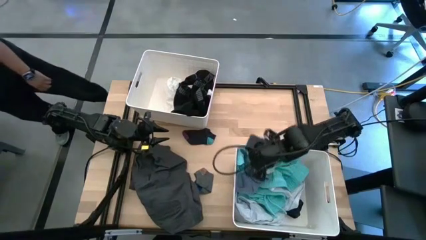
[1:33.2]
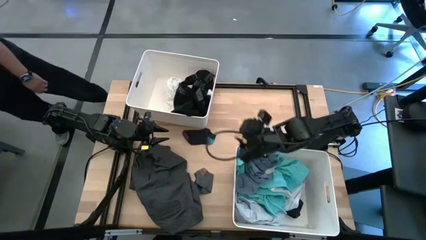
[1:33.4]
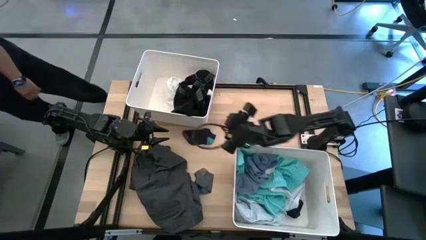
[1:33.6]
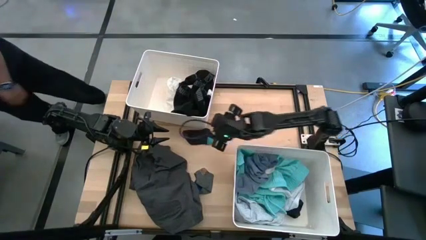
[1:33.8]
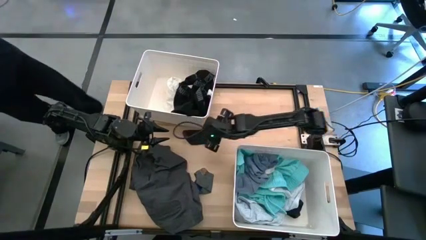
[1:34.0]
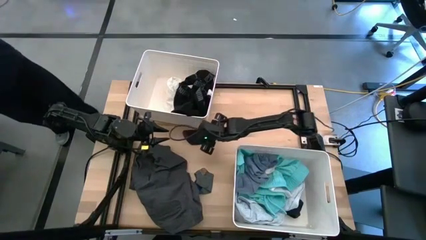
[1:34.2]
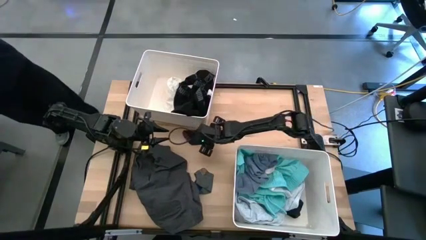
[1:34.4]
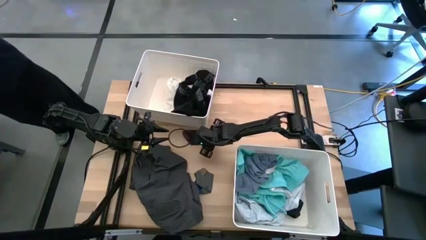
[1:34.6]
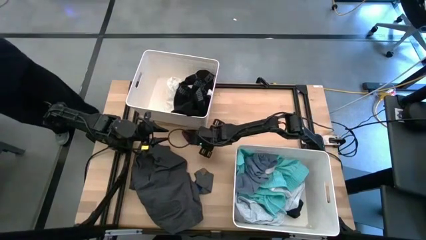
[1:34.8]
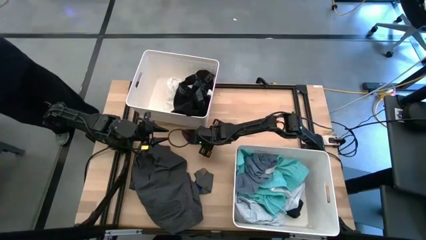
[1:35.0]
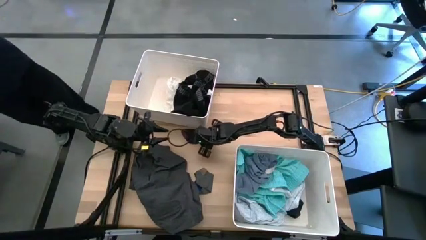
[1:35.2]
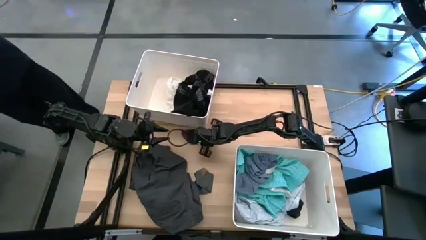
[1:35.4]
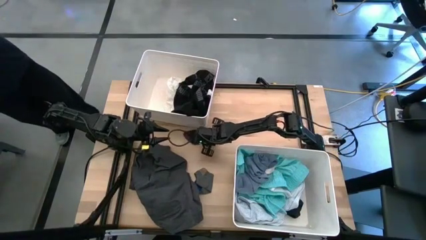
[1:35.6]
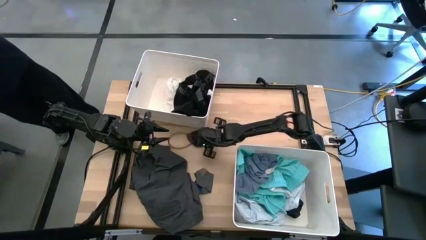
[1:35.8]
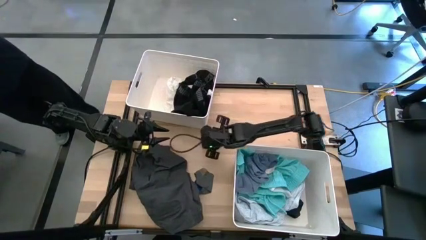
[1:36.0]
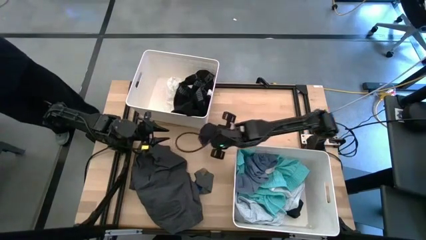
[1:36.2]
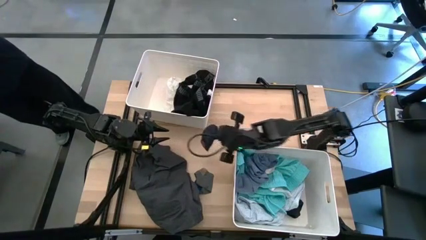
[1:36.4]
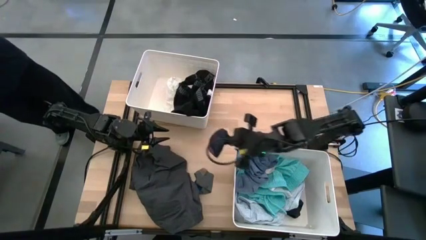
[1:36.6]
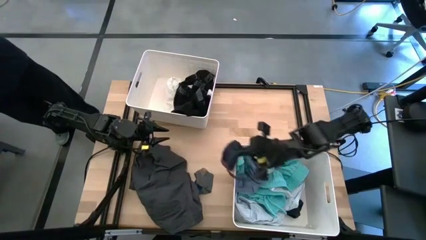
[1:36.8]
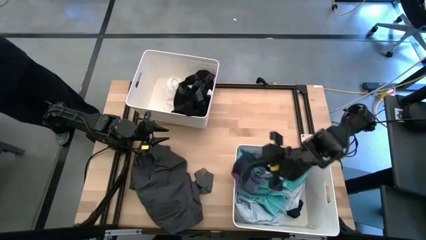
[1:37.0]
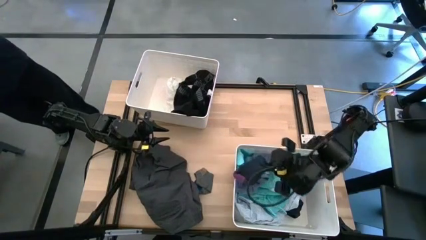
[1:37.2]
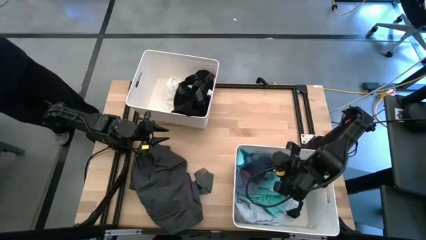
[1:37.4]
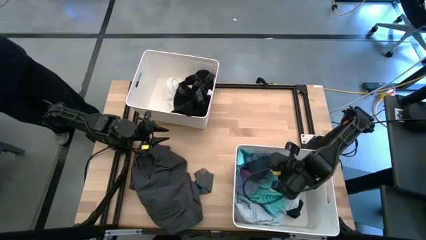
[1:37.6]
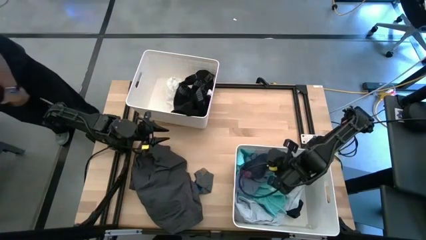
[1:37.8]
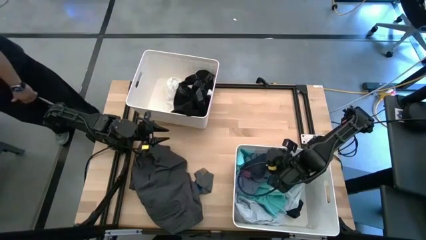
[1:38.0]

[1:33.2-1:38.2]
Task: Sort clothes
Put the purple black sock into the bottom white bin

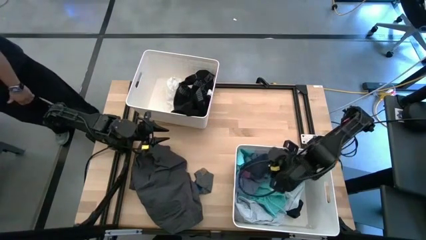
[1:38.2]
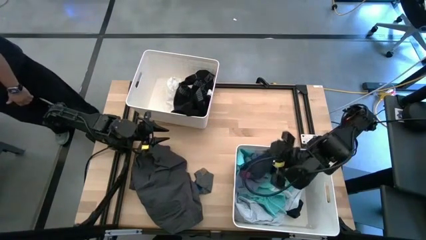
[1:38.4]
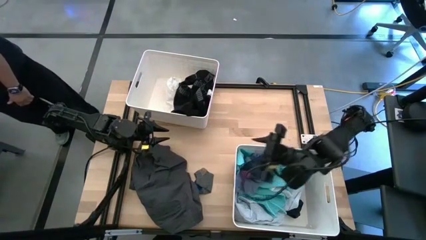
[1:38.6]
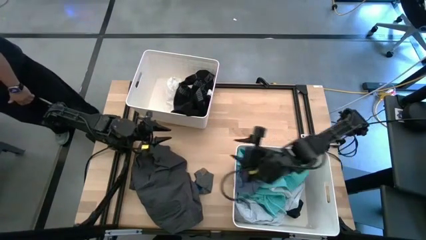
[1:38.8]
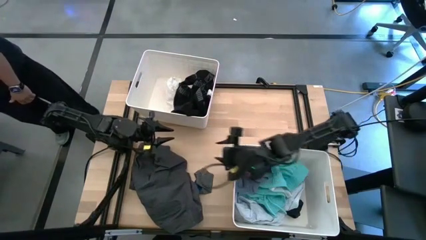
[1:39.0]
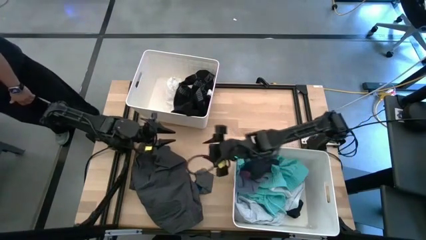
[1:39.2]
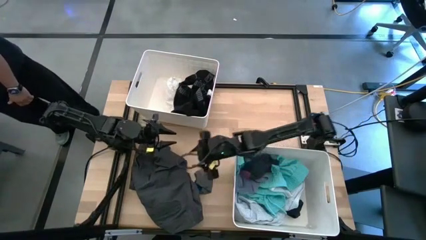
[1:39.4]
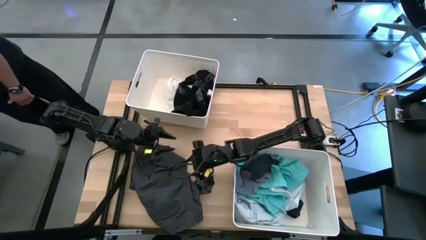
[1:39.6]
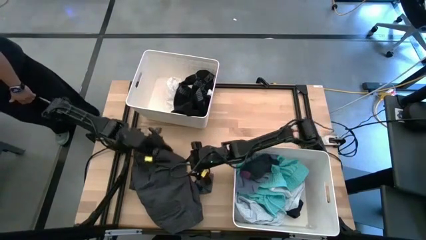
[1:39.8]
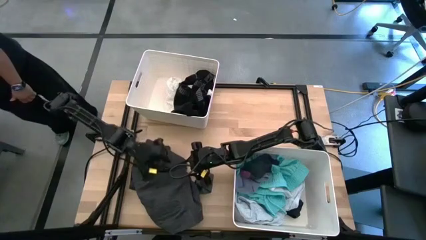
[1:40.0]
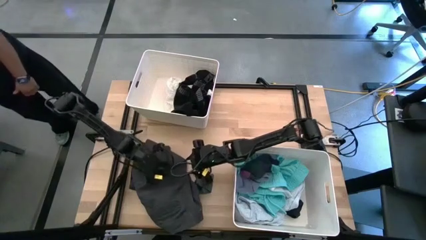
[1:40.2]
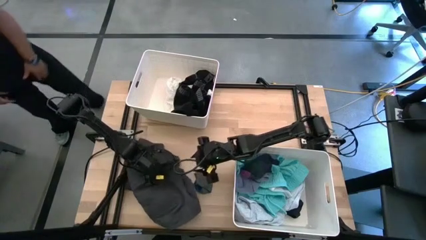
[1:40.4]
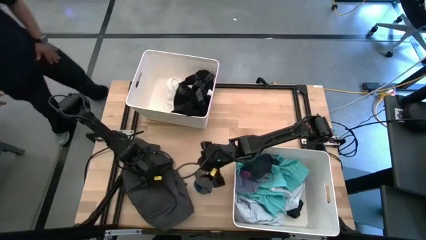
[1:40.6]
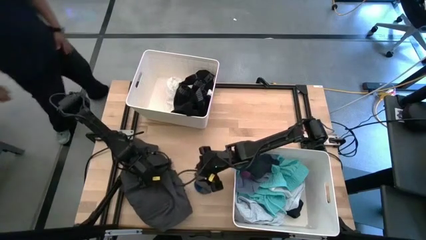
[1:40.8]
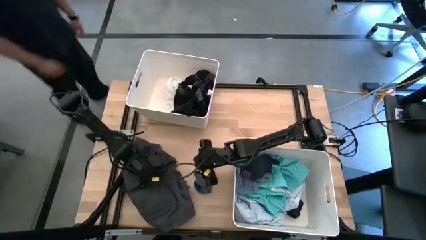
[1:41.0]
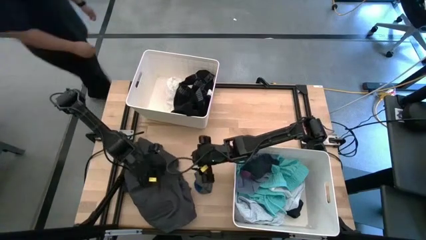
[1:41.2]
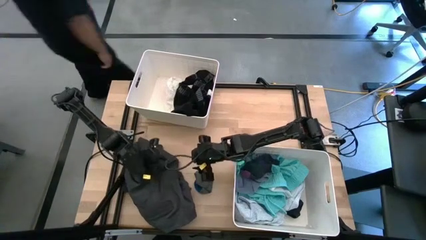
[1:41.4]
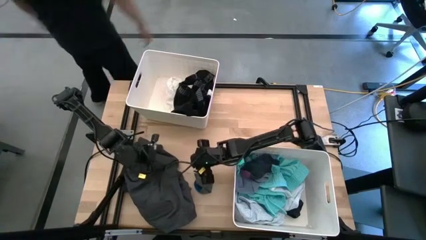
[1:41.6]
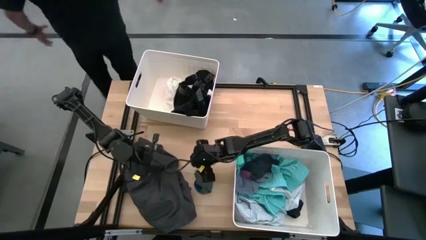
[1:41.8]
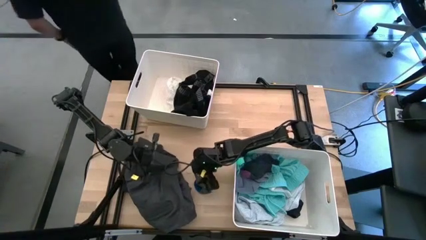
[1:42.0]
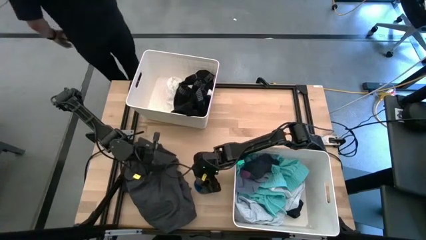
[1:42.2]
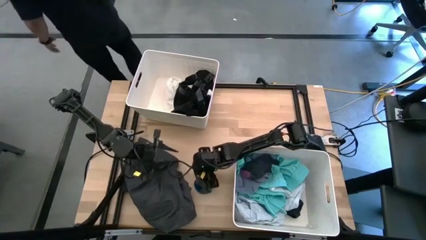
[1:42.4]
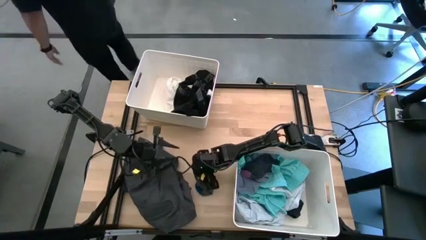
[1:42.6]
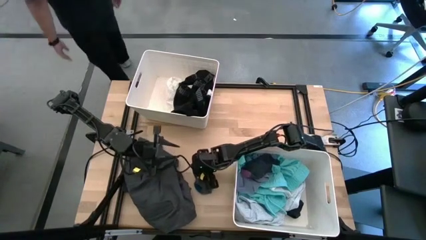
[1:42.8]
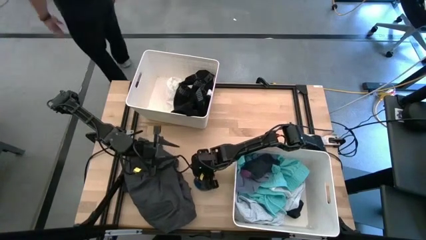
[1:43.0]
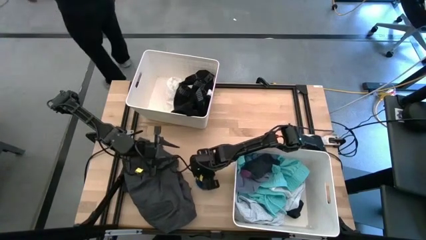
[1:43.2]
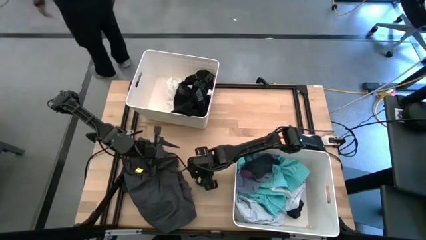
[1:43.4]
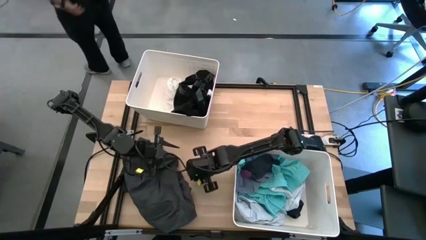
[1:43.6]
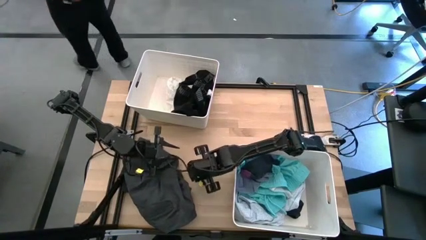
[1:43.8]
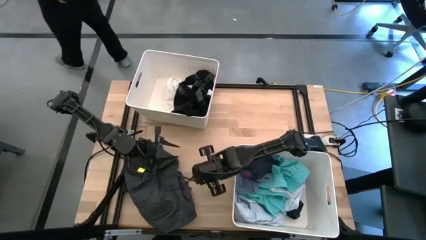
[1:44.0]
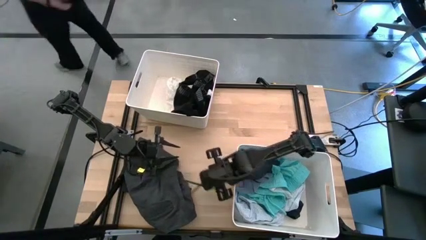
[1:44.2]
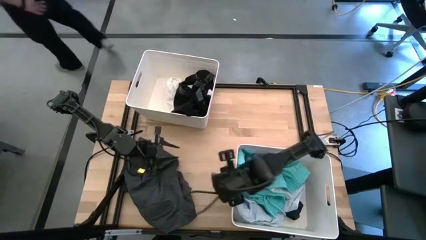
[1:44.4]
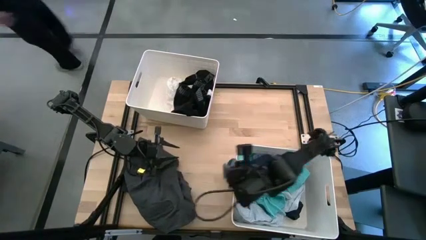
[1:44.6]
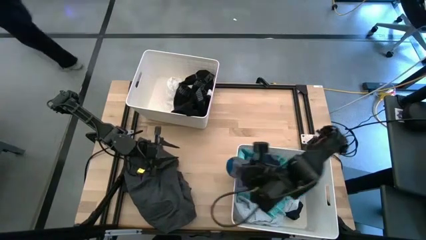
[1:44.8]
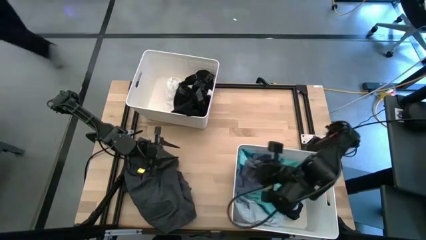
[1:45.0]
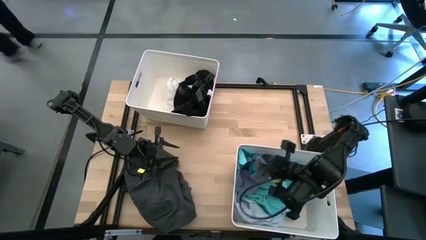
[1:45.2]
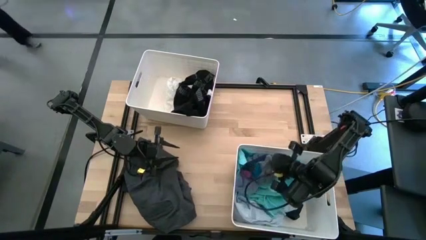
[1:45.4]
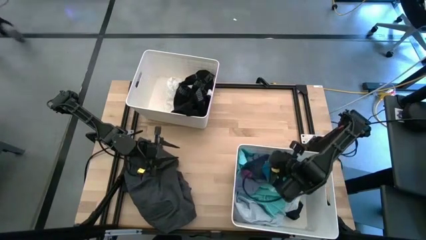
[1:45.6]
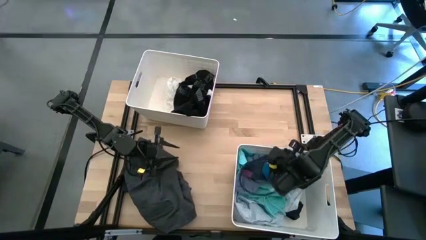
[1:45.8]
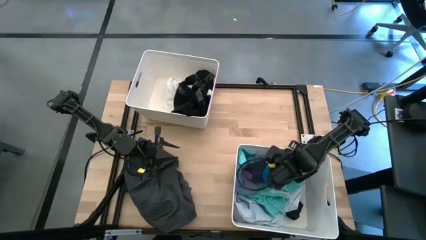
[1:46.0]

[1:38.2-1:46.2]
Put the gray blue sock into the bottom white bin
